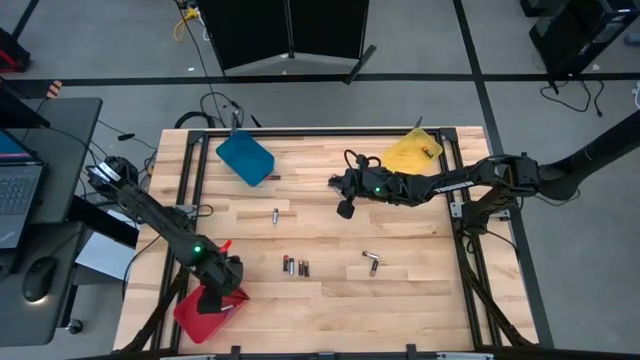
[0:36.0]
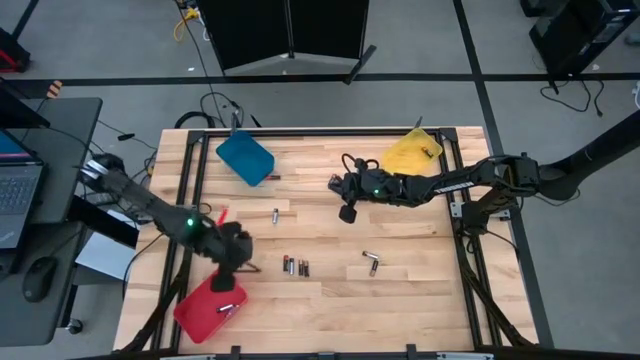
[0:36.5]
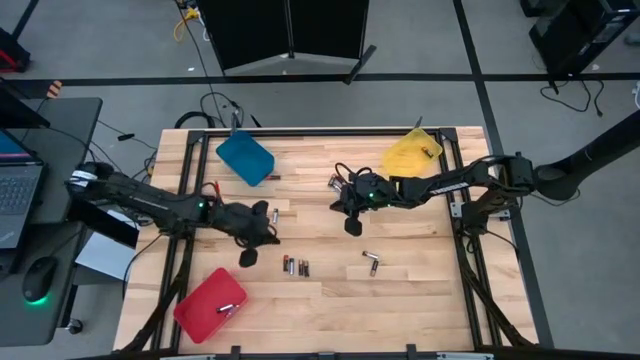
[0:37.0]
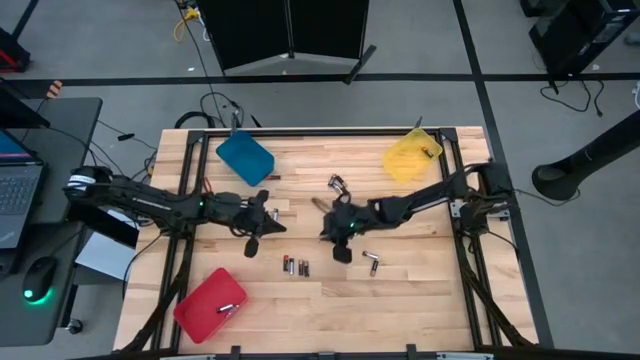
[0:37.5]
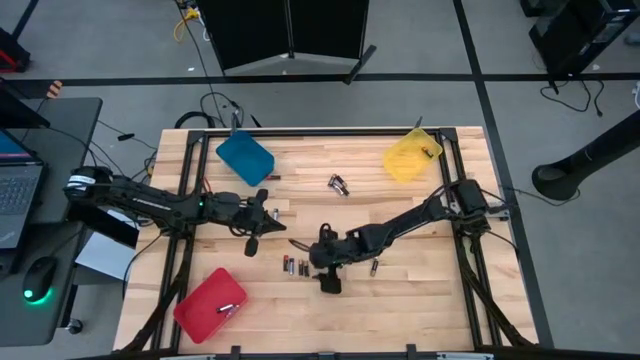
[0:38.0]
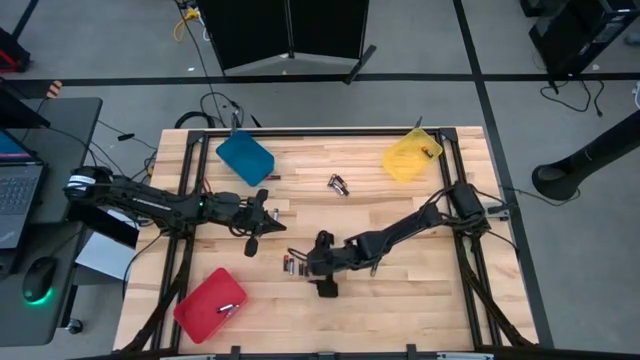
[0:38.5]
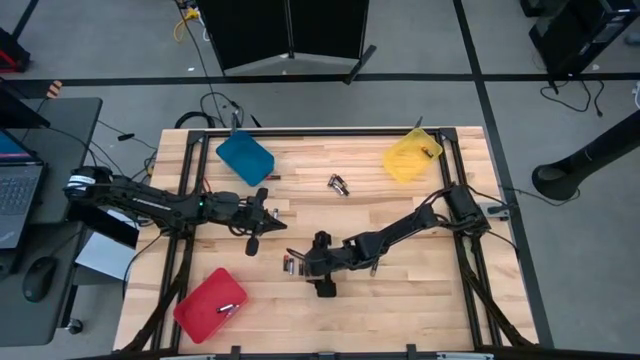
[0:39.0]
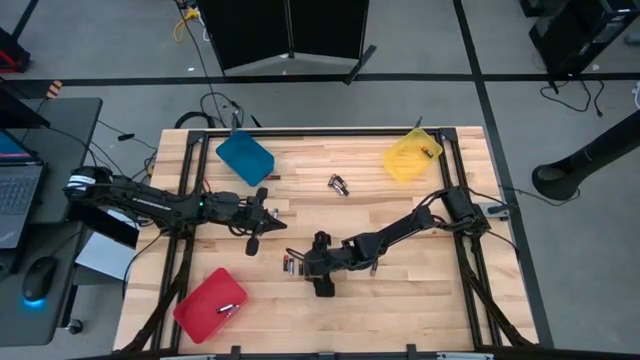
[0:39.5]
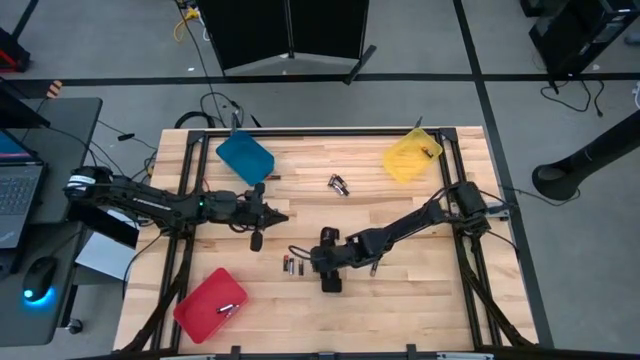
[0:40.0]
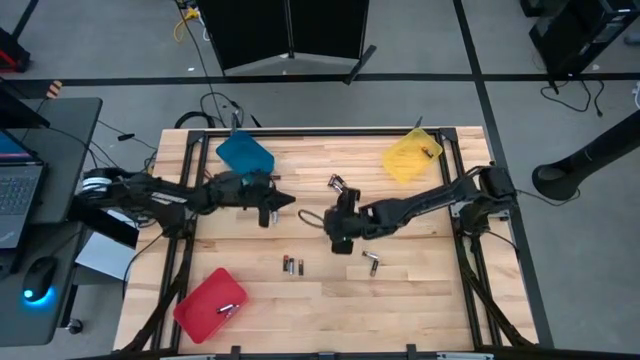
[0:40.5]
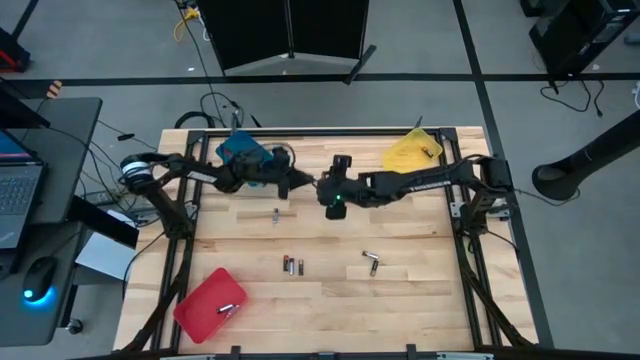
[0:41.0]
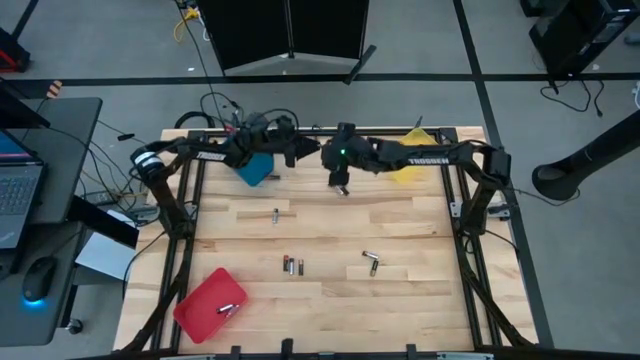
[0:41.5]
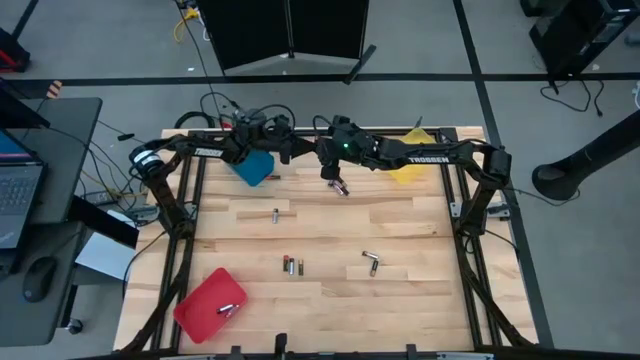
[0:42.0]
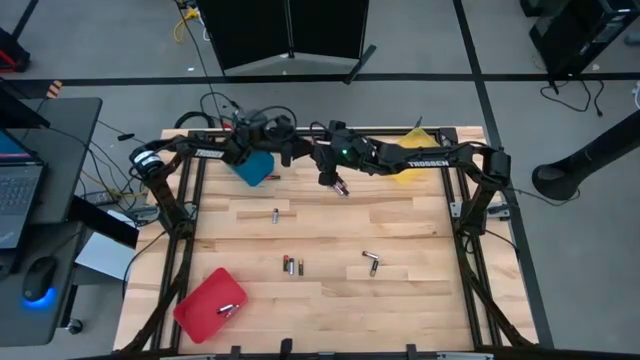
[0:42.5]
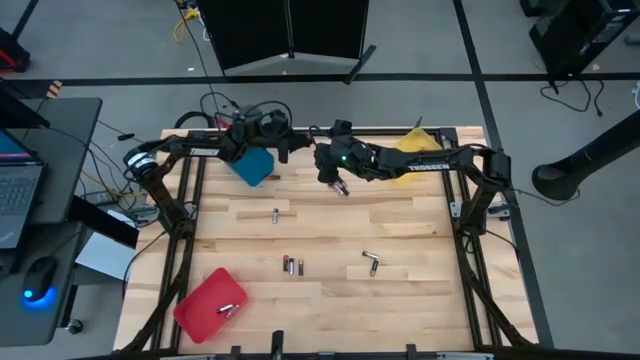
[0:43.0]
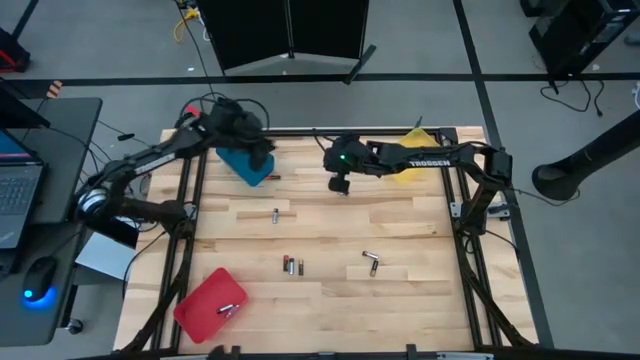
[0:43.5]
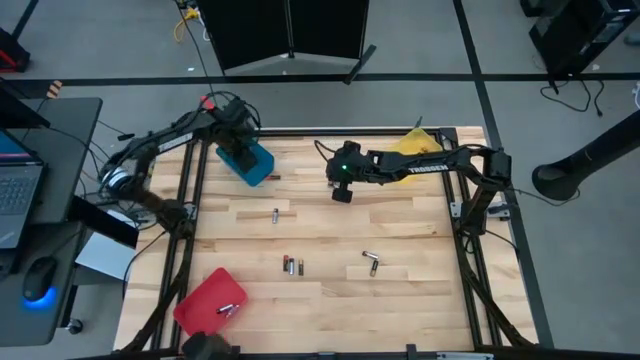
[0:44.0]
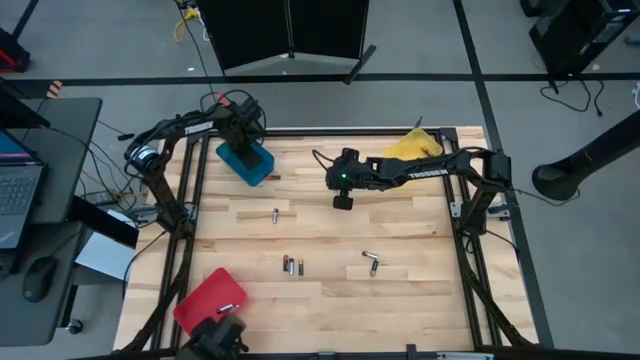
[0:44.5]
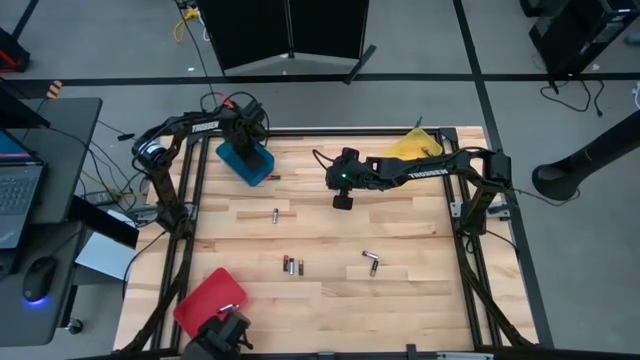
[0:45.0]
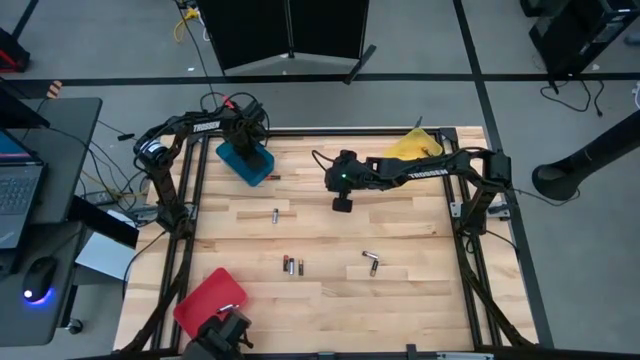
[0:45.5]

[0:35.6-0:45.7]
Task: Sort batteries
Put the black brown battery into the blue bin

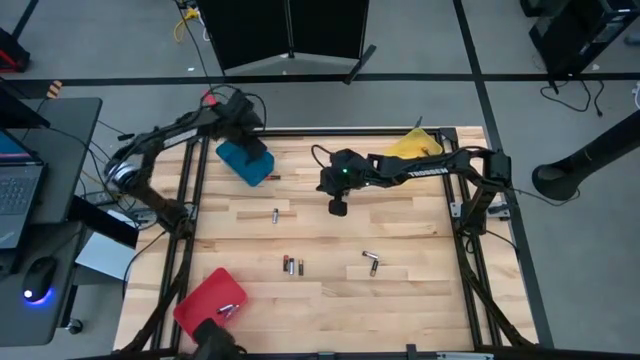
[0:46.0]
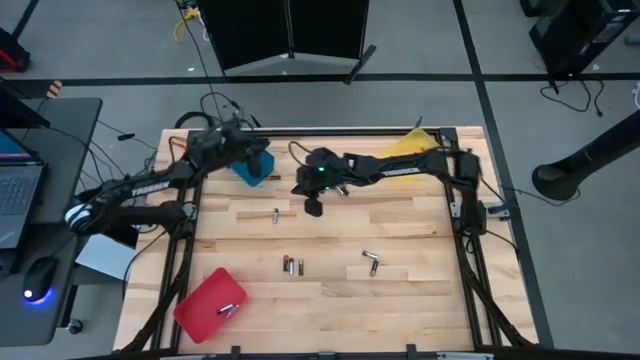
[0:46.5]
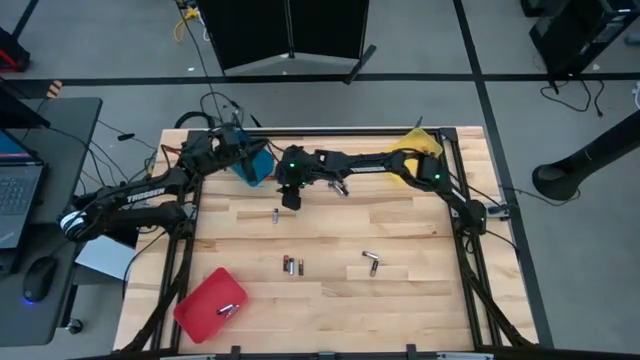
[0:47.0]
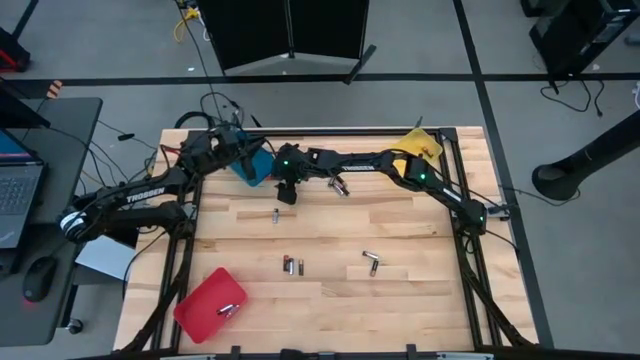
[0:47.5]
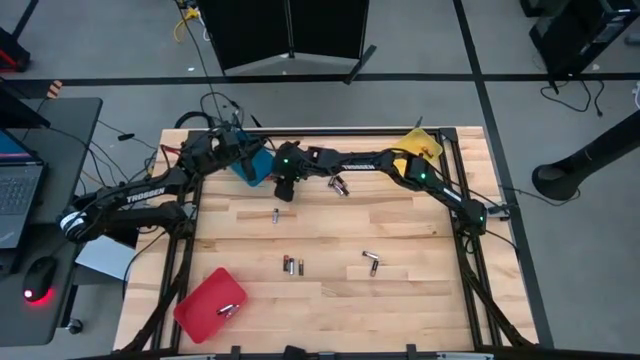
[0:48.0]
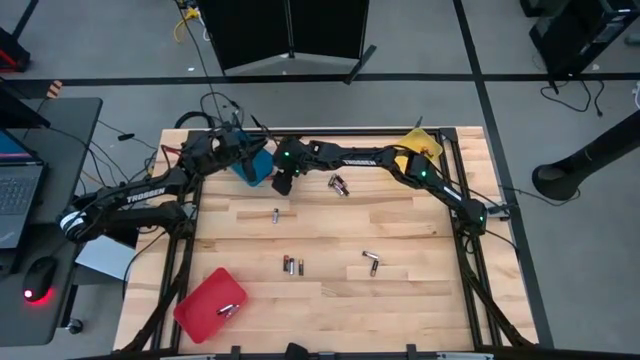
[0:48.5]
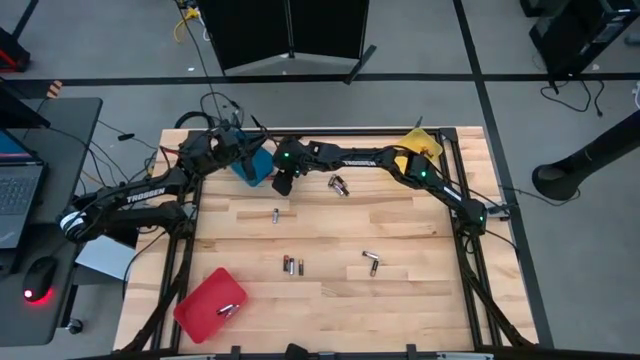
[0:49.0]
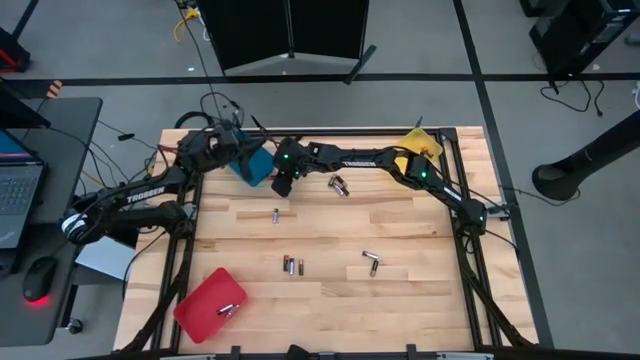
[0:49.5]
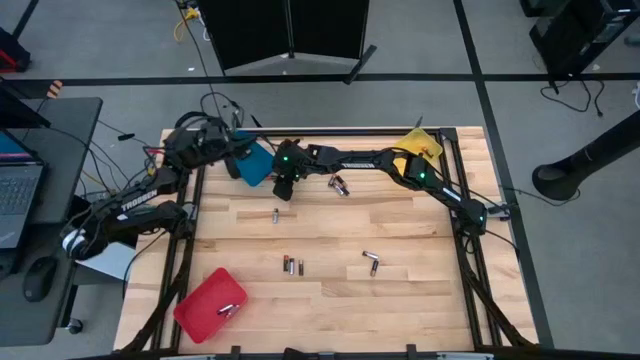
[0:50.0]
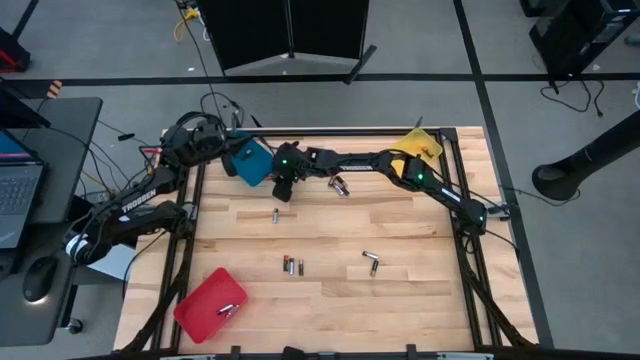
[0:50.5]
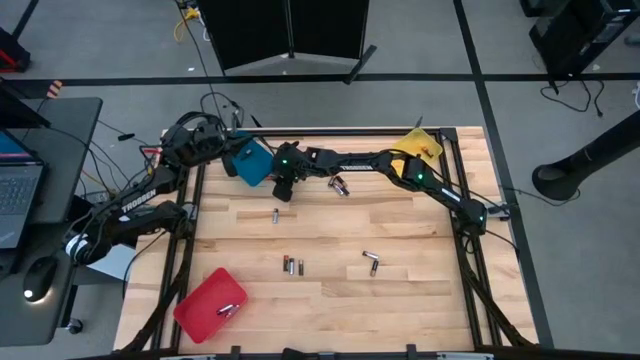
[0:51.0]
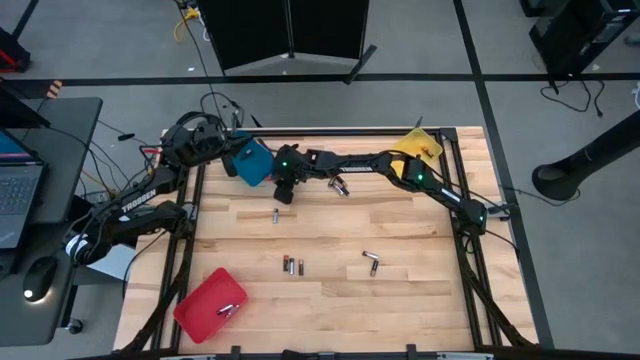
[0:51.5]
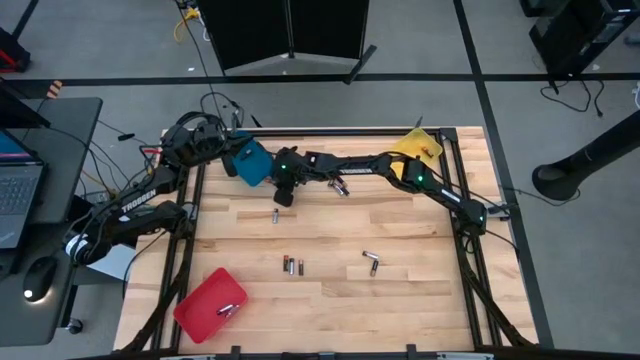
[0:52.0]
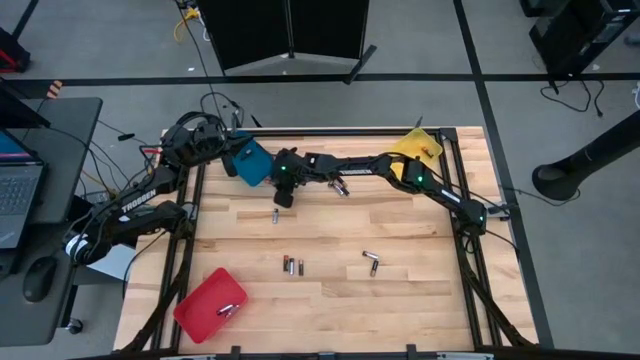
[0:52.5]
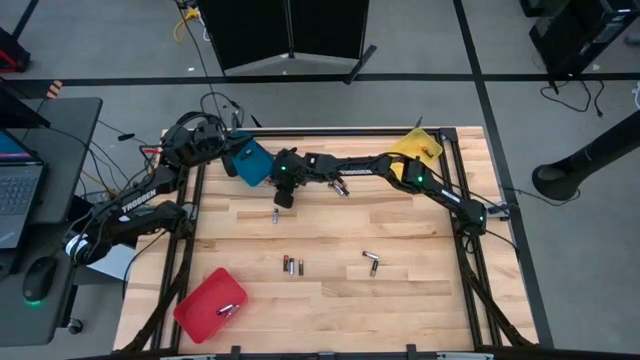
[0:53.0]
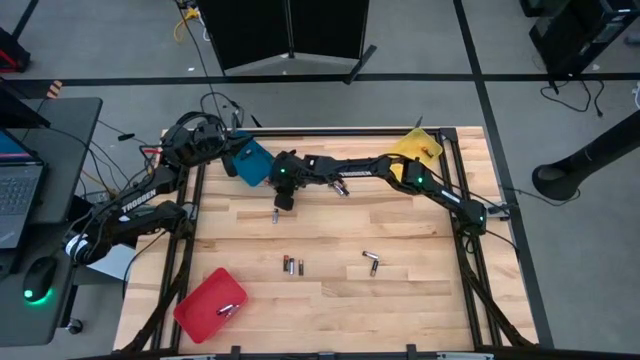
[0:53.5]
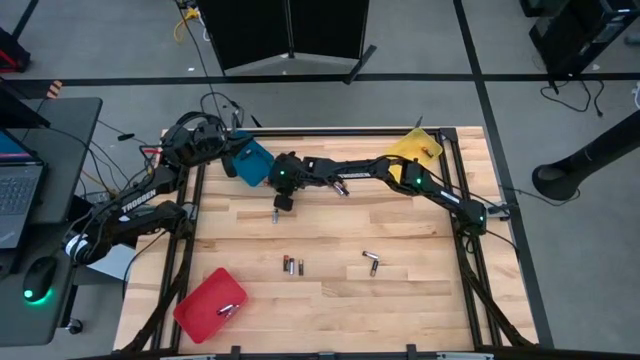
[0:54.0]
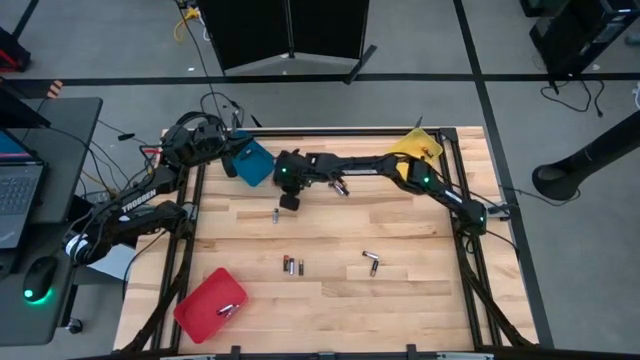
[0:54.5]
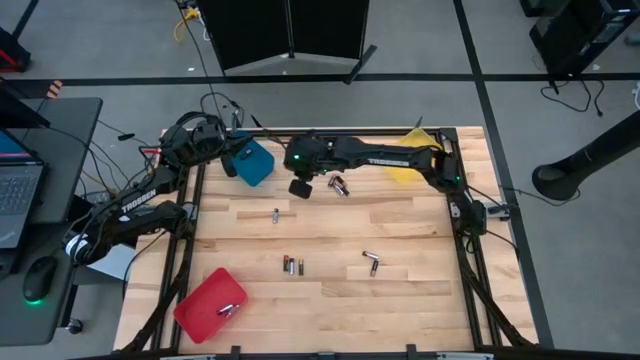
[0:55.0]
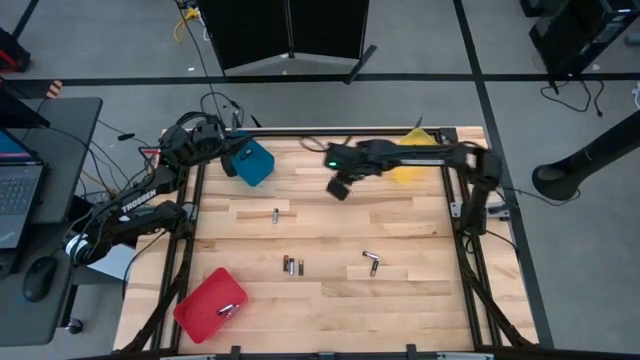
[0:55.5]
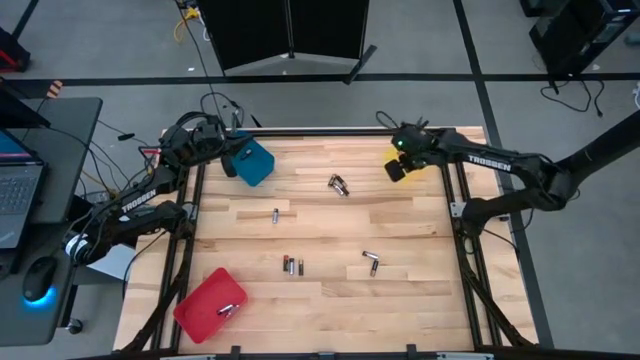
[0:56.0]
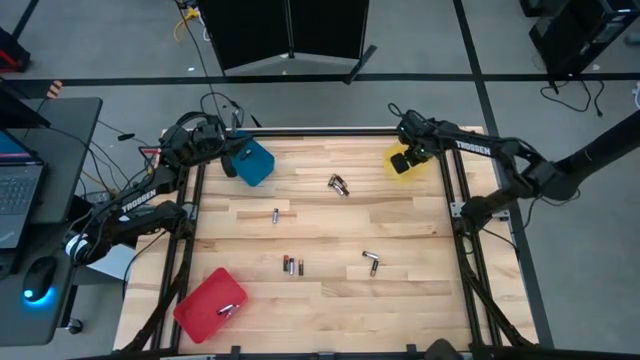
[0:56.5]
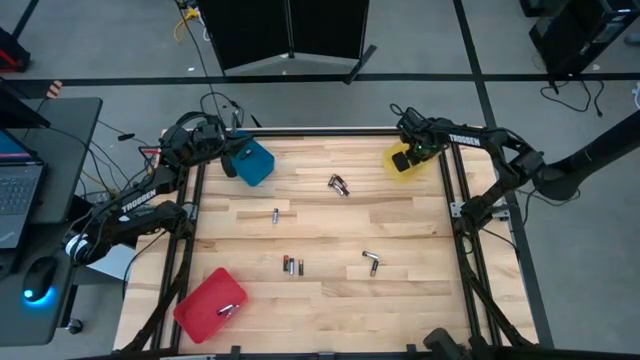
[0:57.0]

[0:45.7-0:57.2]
Put the top left black orange battery into the yellow bin

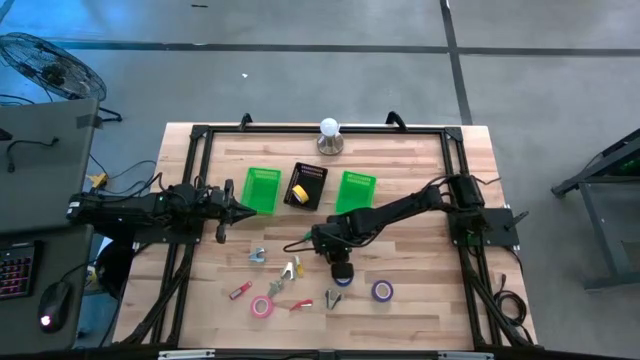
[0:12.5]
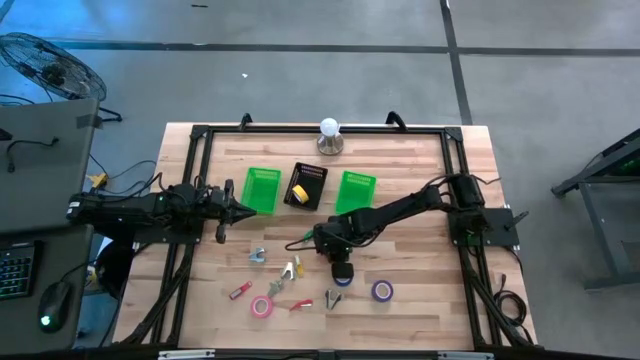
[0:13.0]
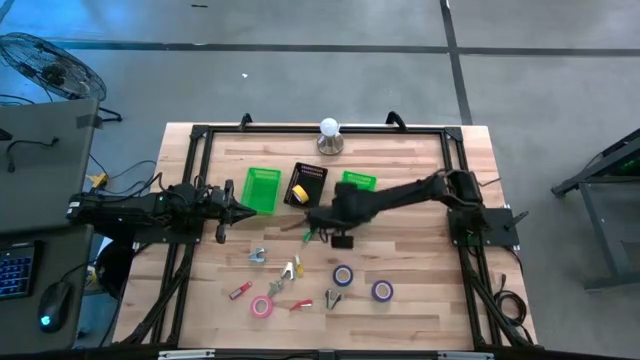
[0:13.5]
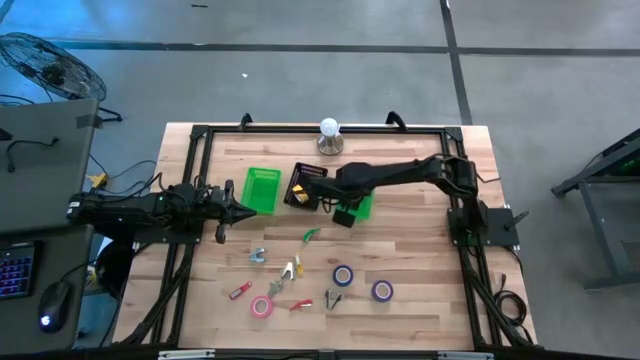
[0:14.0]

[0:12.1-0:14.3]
Task: Pick and place Stapler, Stapler remover, tape
Put the top right red stapler into the right green bin
